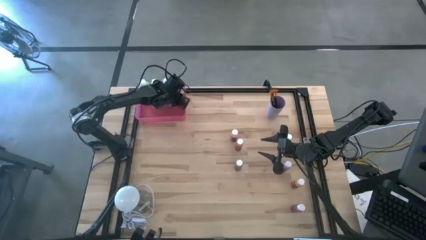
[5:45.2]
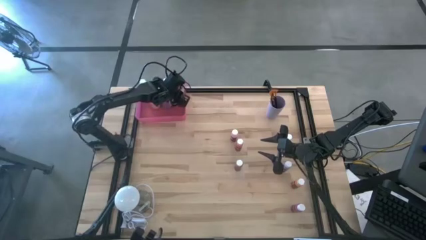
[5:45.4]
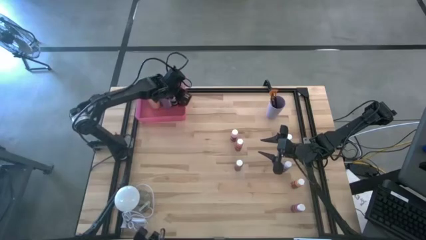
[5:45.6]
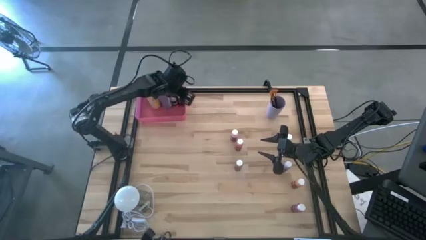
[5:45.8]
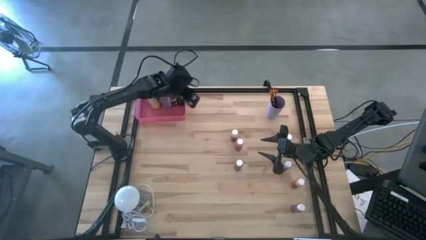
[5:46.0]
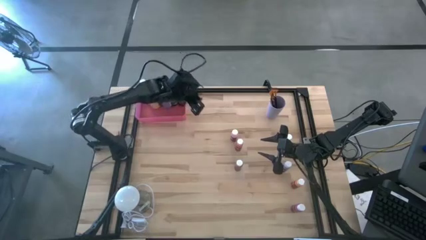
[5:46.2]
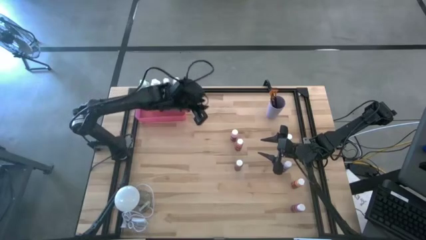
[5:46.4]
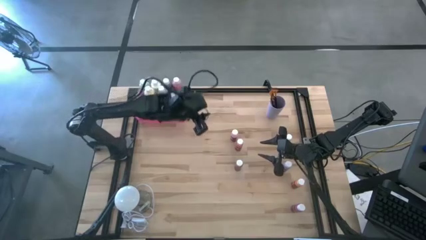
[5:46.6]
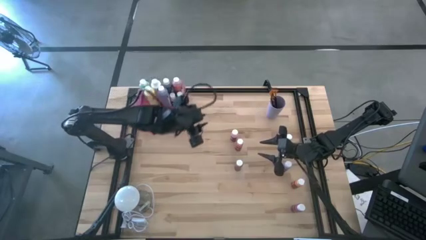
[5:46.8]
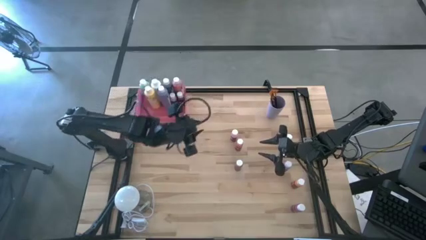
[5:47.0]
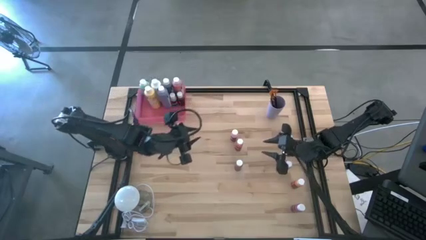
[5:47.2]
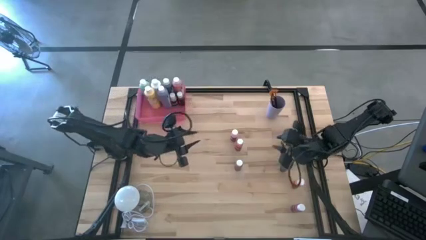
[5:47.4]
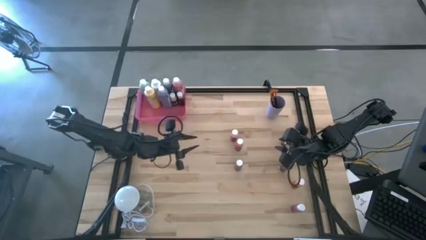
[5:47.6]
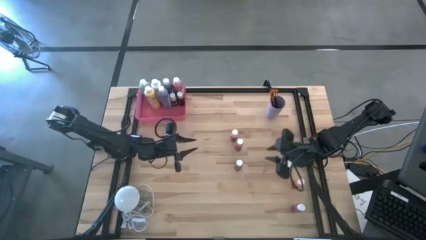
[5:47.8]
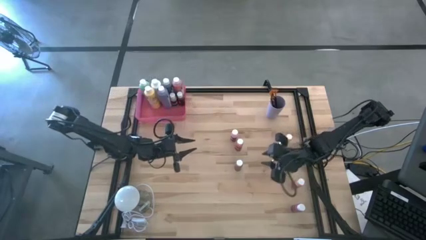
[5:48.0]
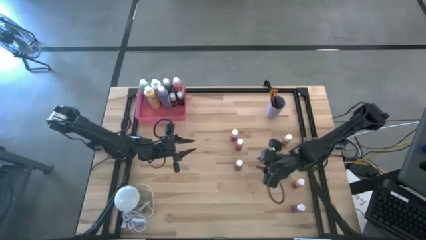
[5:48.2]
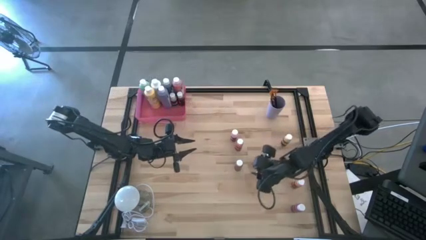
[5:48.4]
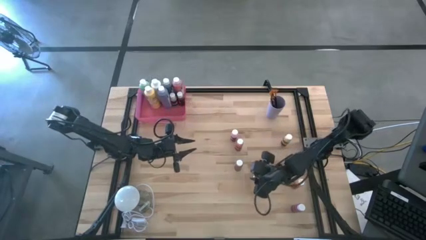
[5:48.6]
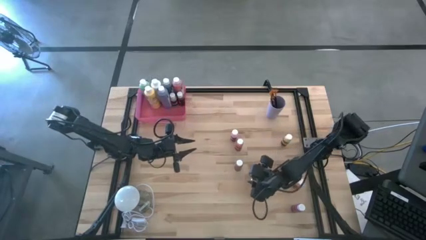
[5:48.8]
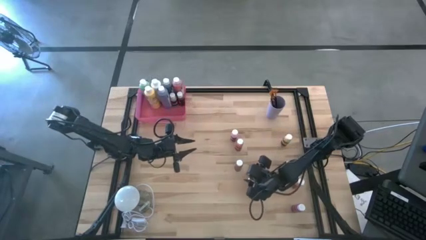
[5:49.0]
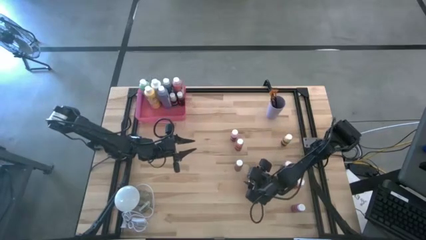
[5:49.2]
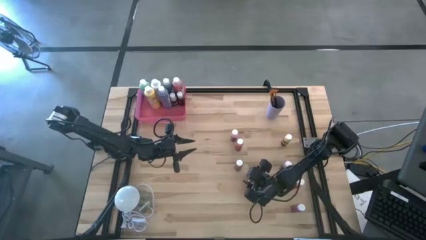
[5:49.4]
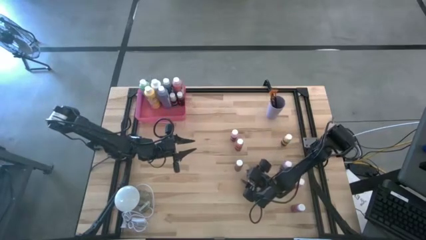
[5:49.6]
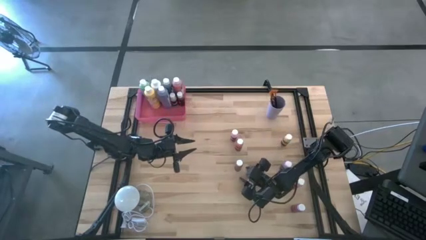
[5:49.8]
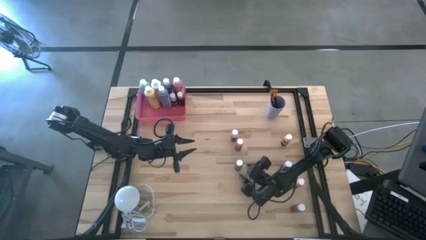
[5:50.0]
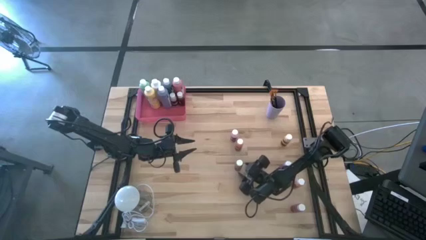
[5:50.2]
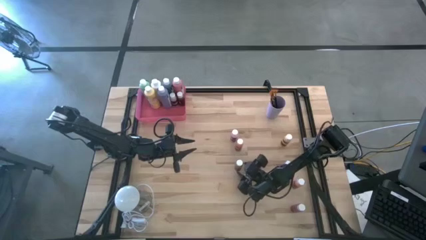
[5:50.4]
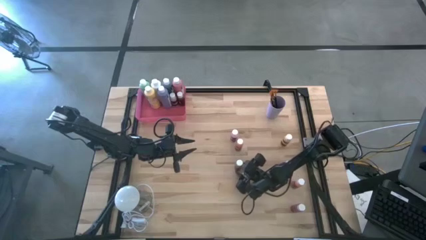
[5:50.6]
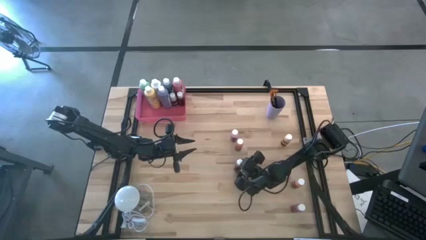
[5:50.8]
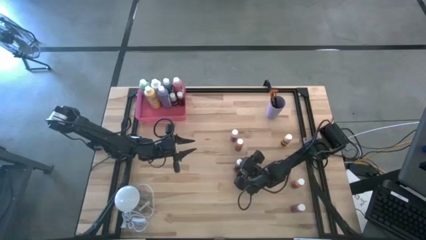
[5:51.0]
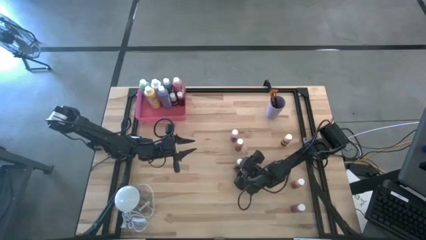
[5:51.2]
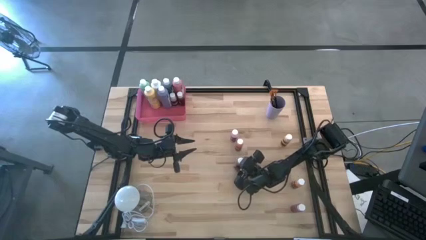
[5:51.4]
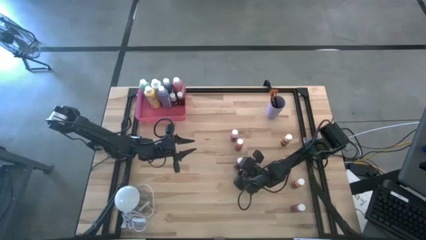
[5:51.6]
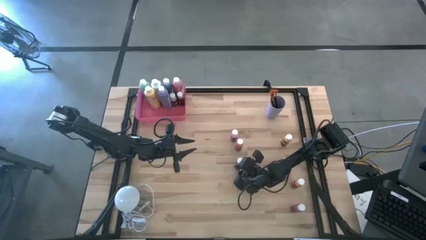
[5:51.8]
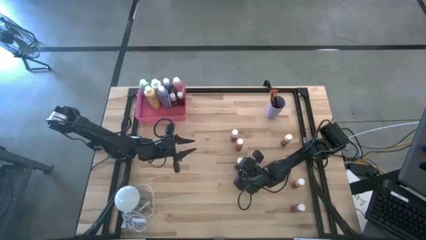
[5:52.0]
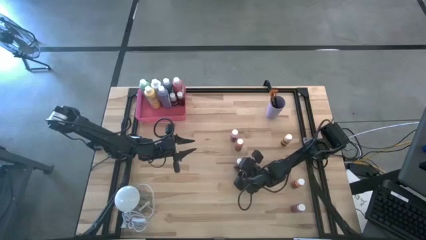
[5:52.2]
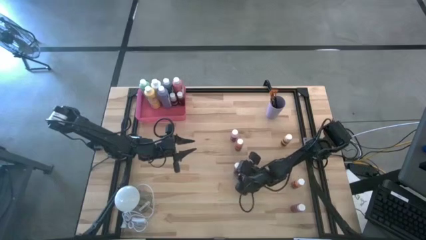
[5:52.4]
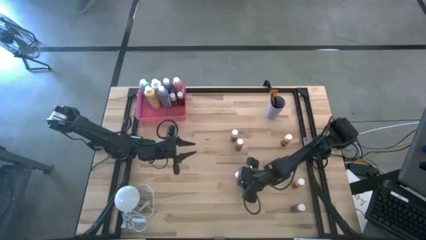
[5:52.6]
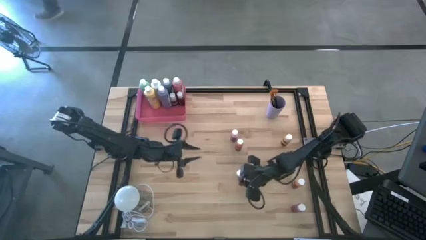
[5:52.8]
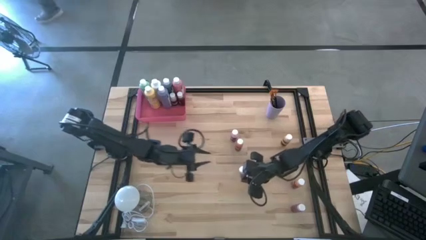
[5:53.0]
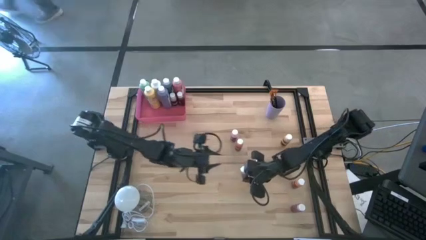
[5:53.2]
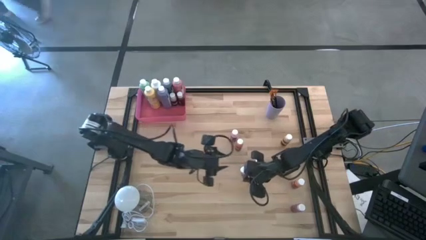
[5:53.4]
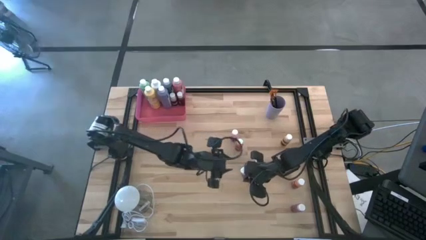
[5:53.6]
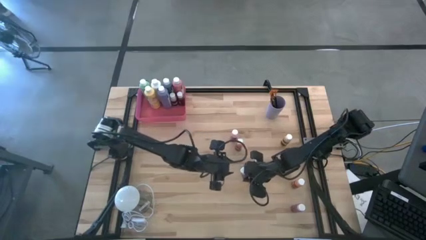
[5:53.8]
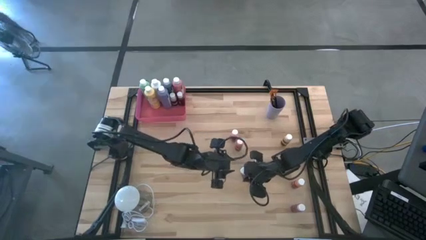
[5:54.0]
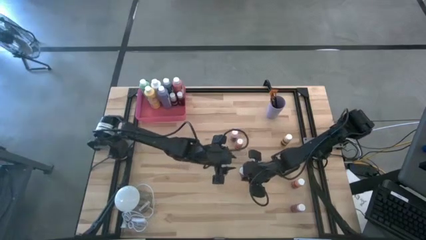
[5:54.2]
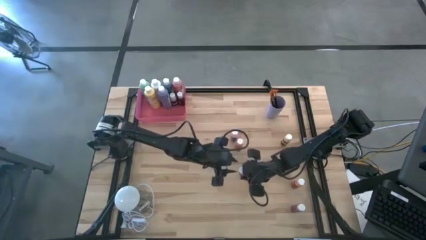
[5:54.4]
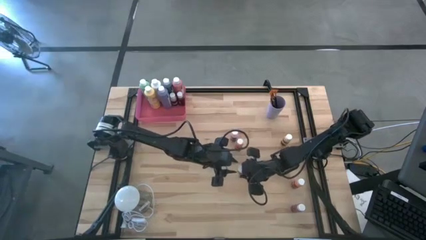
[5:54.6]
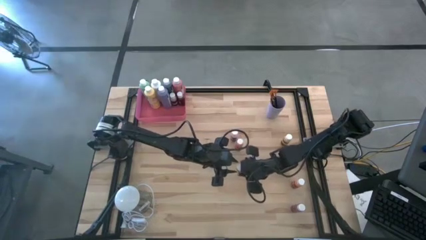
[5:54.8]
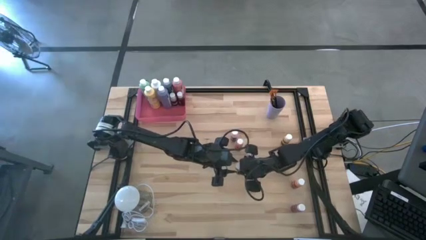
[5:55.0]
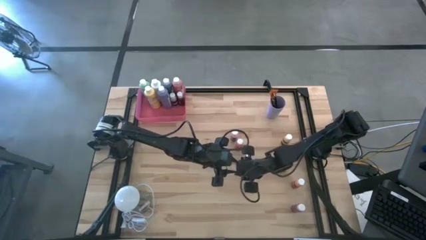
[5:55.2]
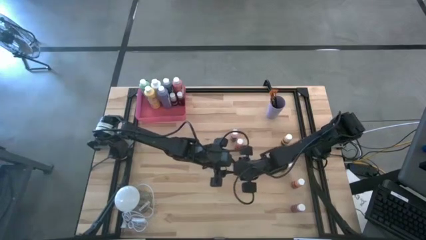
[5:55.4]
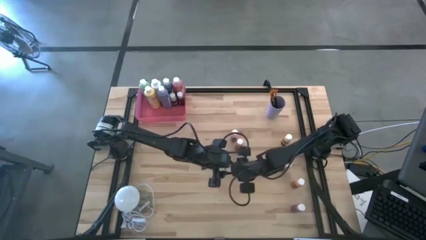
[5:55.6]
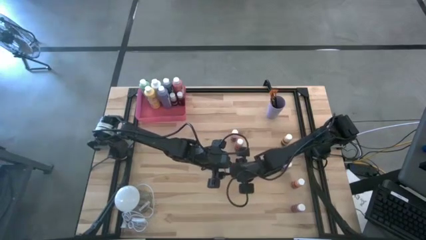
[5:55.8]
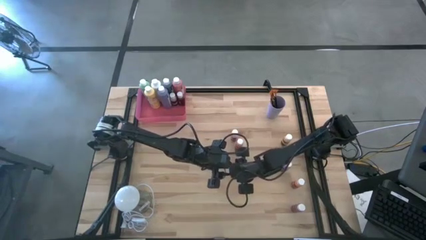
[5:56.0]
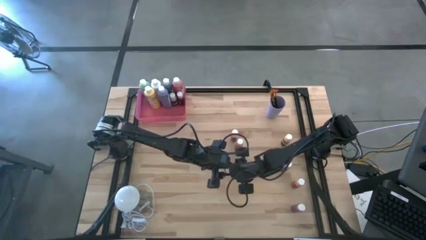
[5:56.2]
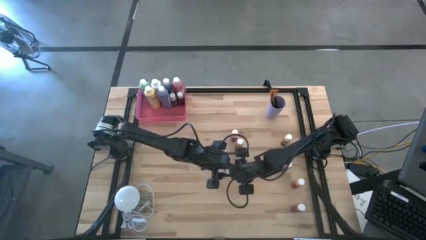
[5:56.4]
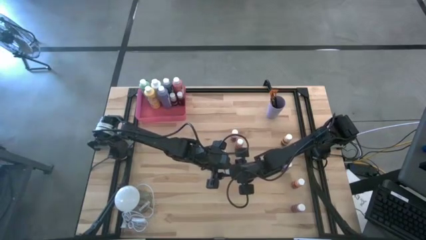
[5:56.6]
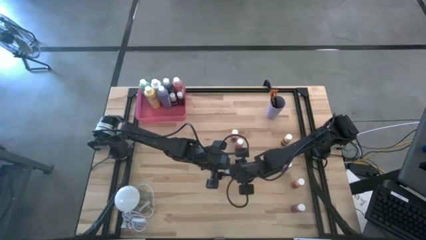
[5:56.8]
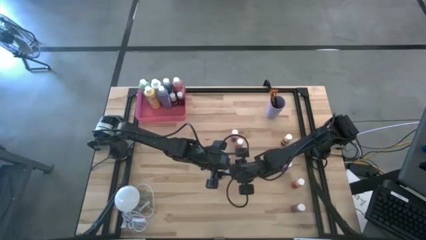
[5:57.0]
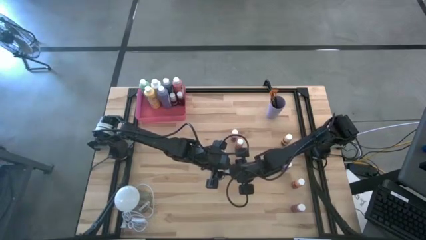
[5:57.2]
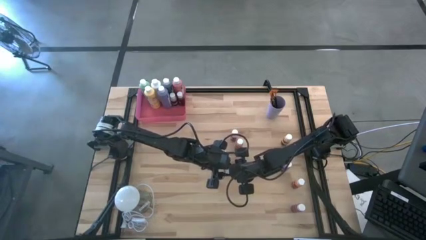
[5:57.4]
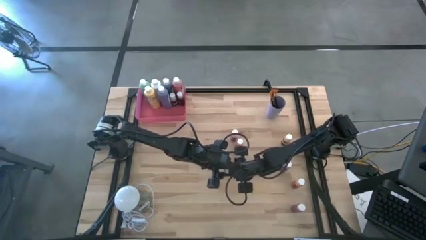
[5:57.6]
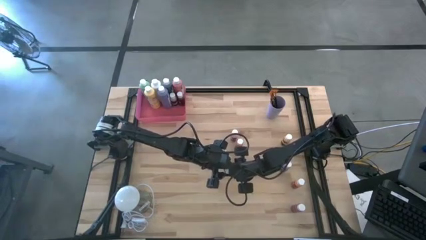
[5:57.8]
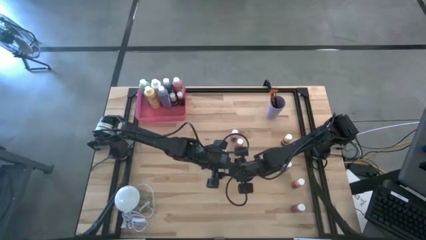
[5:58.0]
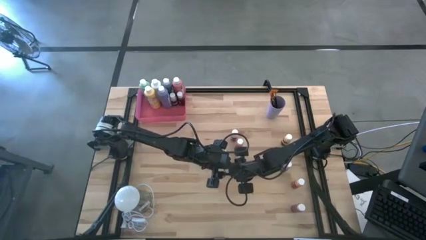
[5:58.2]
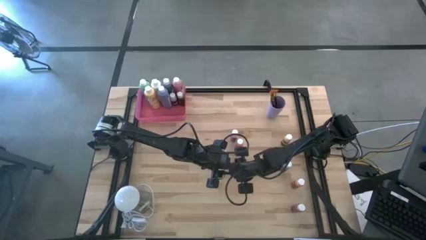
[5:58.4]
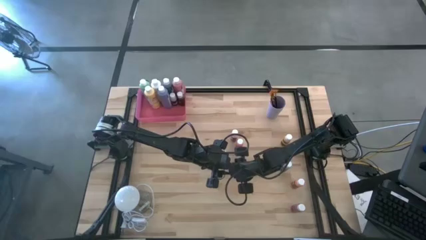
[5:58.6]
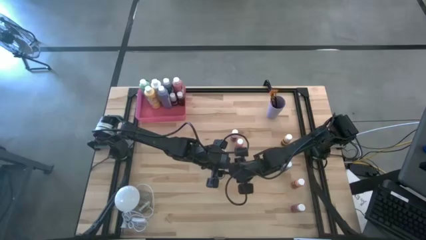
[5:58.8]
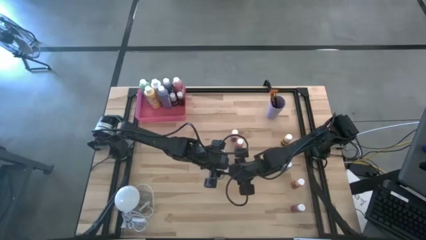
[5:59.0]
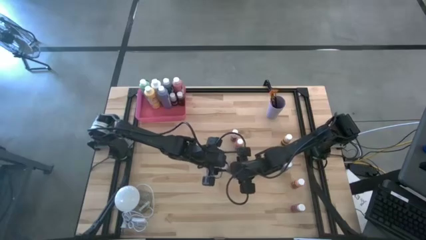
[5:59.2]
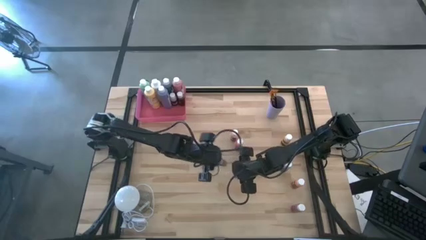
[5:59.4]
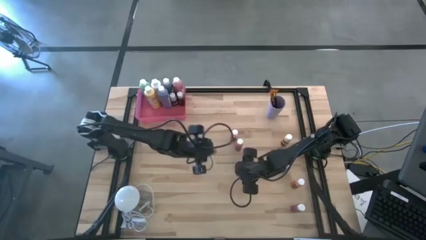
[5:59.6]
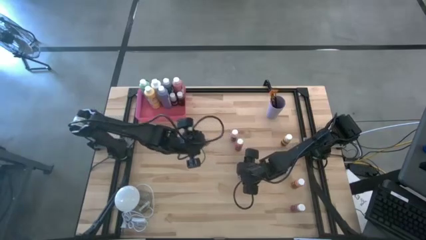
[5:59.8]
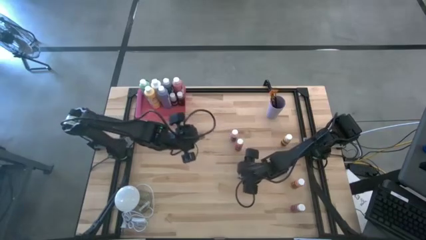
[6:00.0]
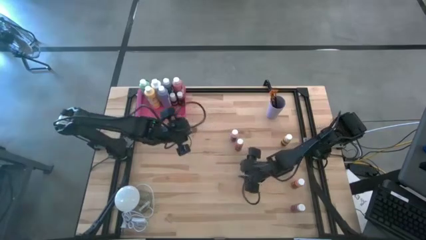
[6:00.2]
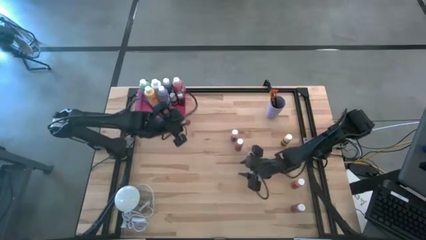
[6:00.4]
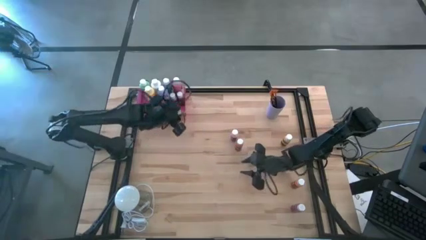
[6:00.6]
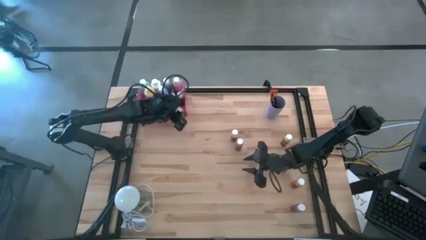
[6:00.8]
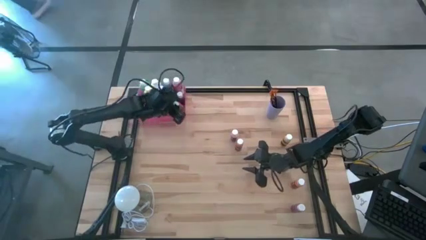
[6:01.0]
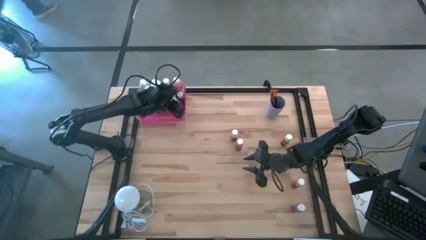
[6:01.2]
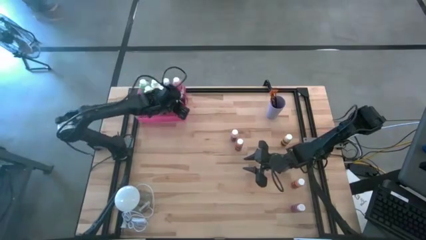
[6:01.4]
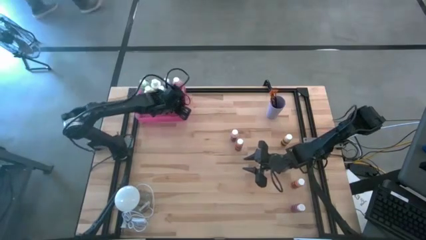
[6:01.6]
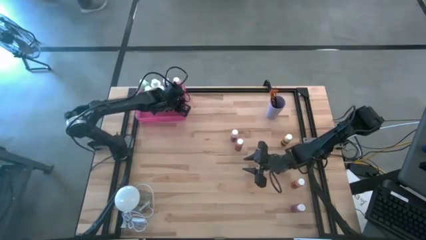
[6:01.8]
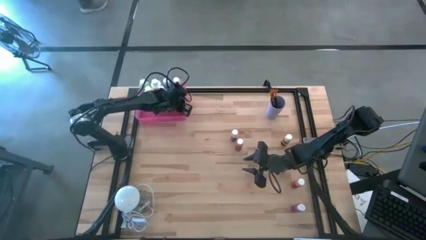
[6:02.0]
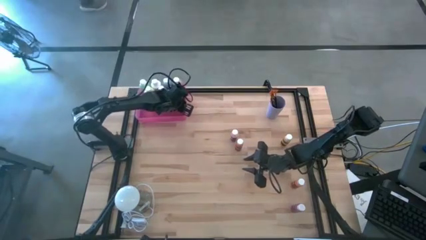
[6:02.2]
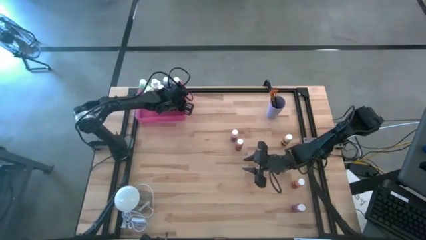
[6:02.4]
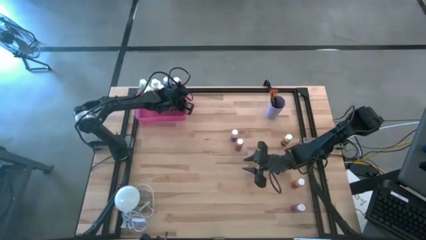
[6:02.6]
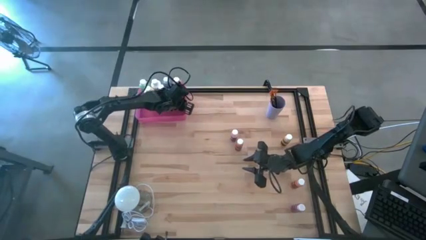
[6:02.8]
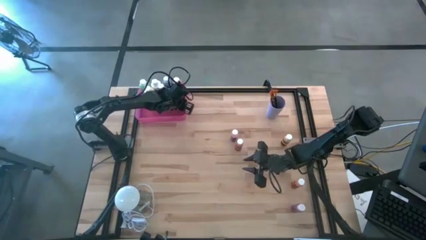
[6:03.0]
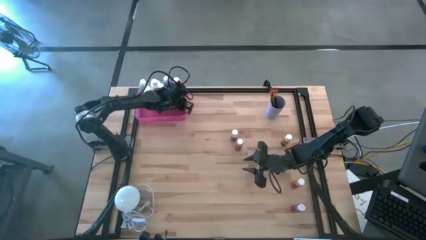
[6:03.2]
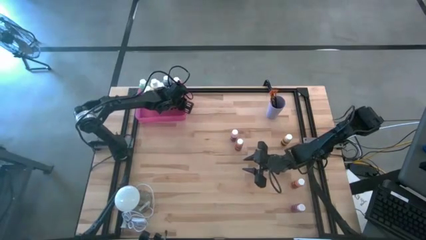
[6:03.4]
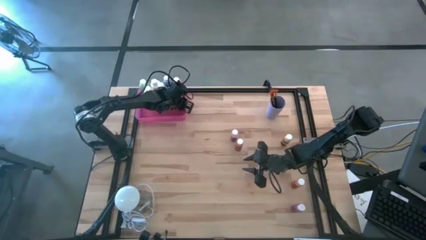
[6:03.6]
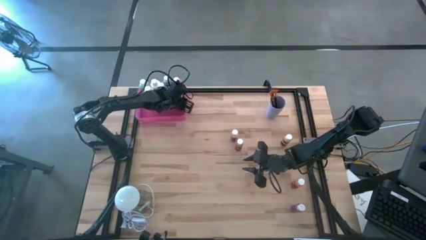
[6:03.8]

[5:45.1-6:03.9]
Task: Pick & Place Paint Supplies
Put the small brown paint bottle into the pink bin
